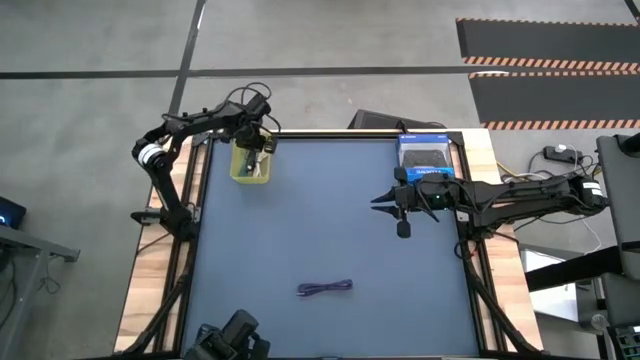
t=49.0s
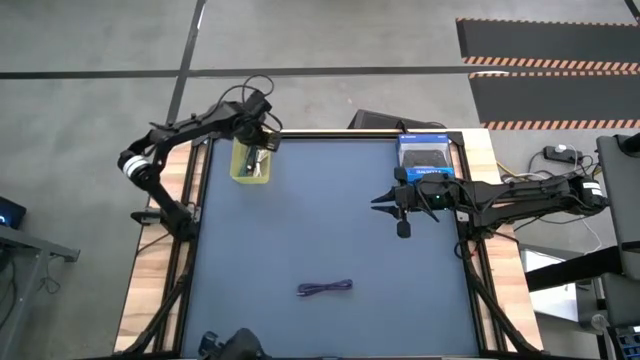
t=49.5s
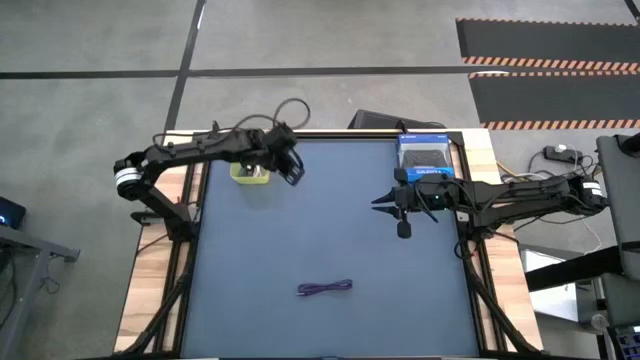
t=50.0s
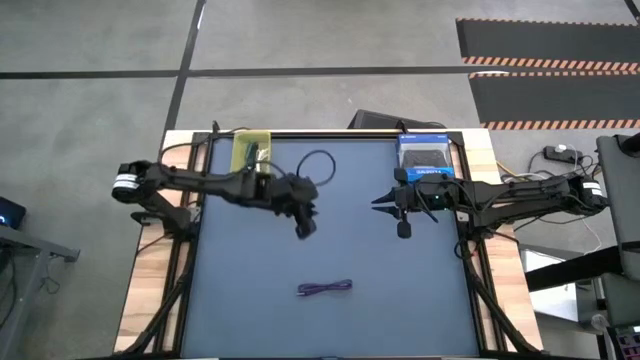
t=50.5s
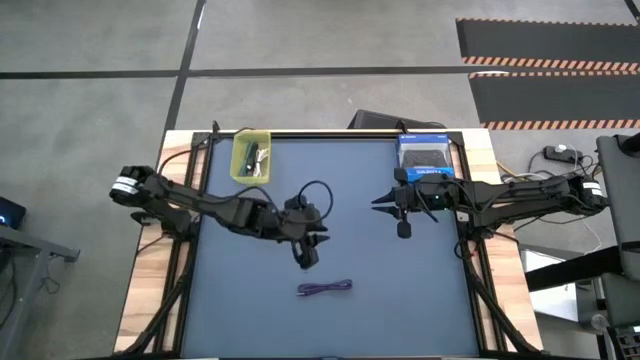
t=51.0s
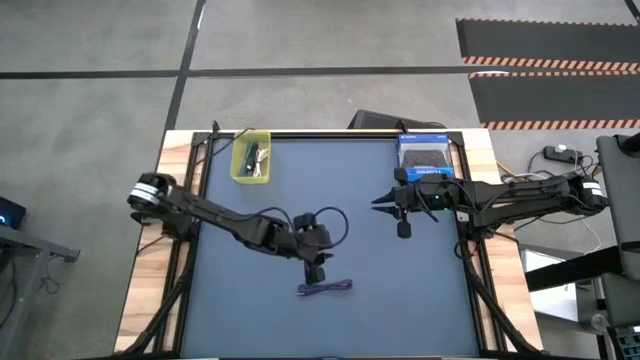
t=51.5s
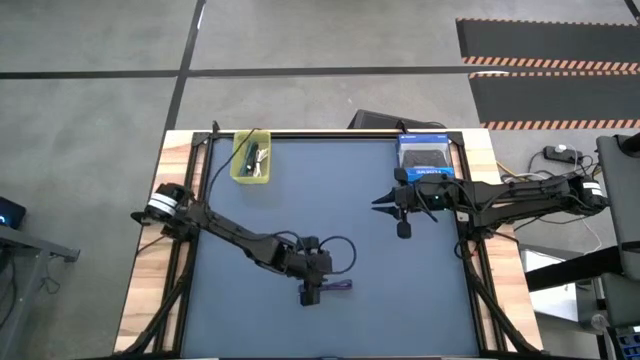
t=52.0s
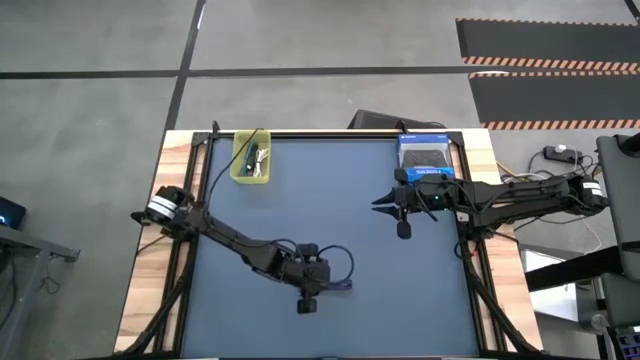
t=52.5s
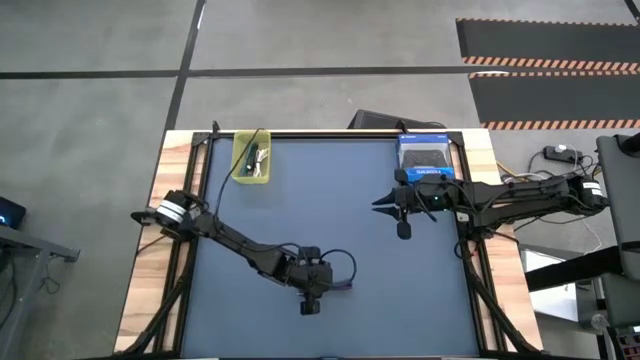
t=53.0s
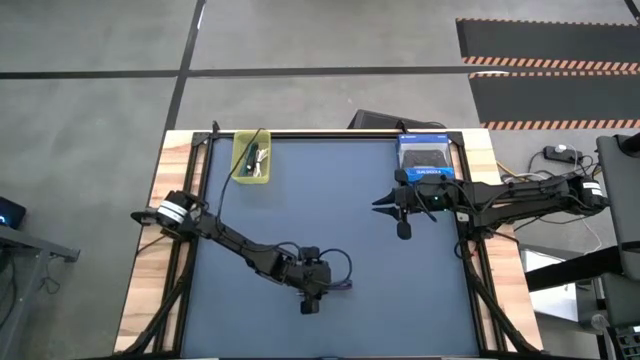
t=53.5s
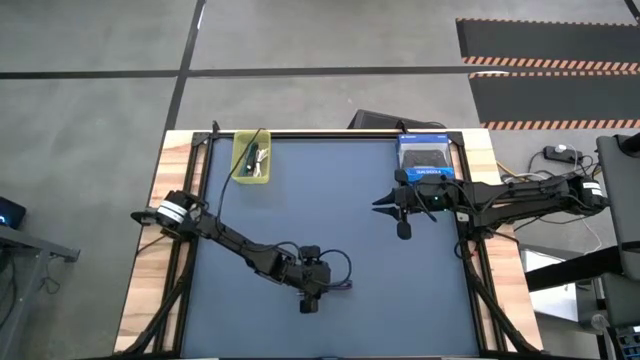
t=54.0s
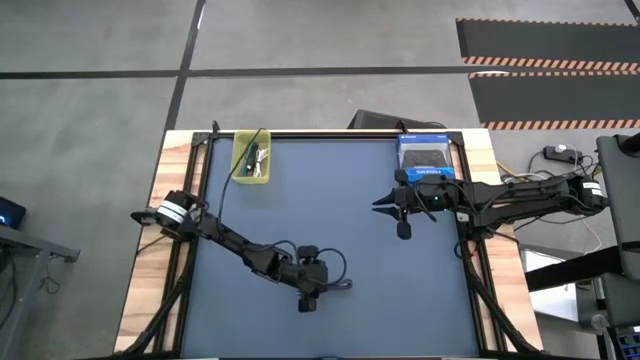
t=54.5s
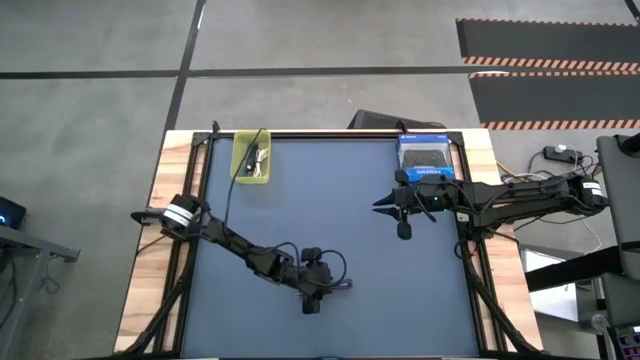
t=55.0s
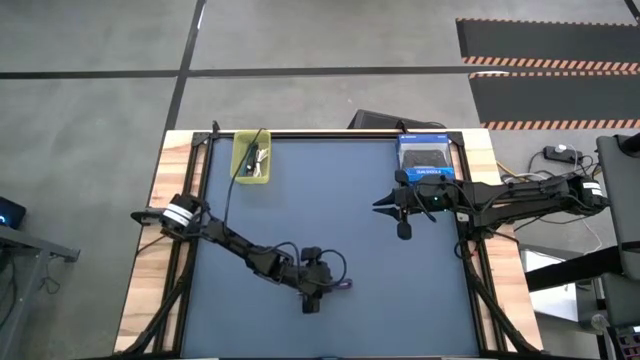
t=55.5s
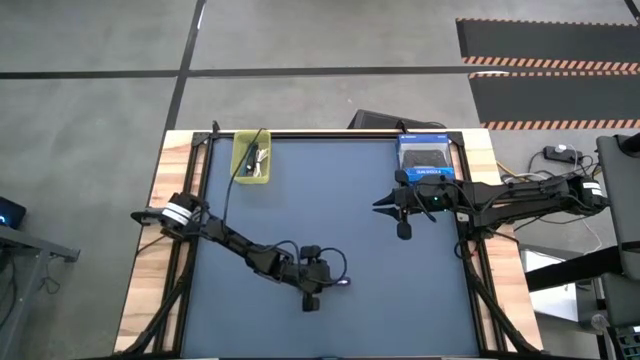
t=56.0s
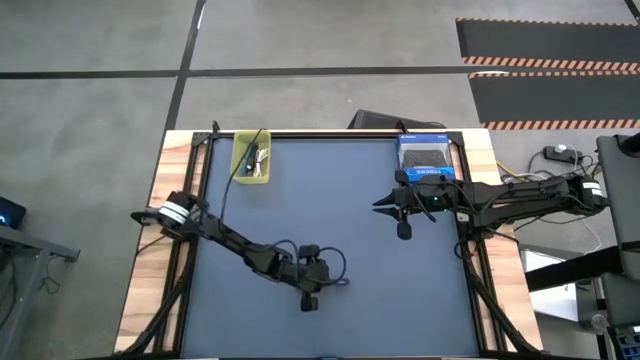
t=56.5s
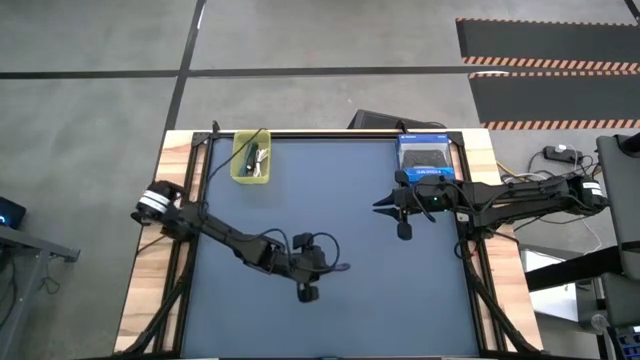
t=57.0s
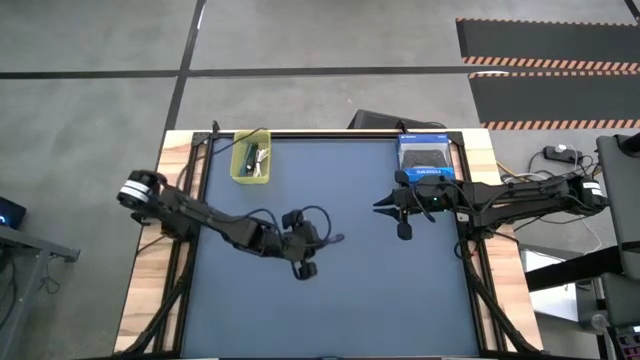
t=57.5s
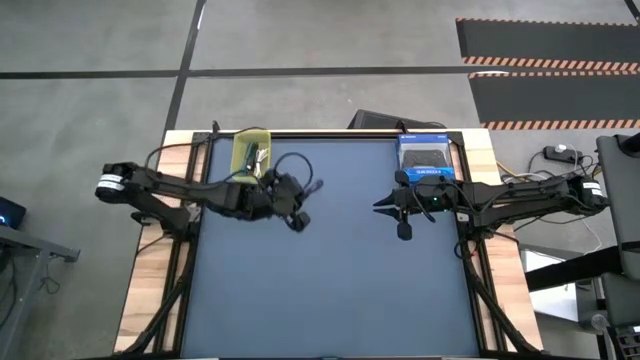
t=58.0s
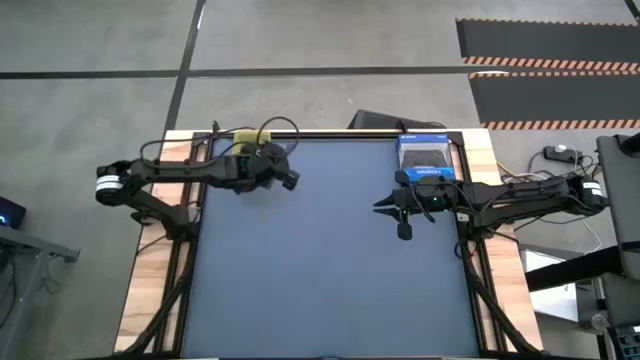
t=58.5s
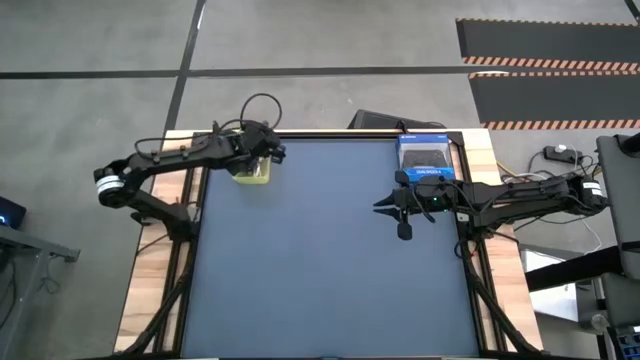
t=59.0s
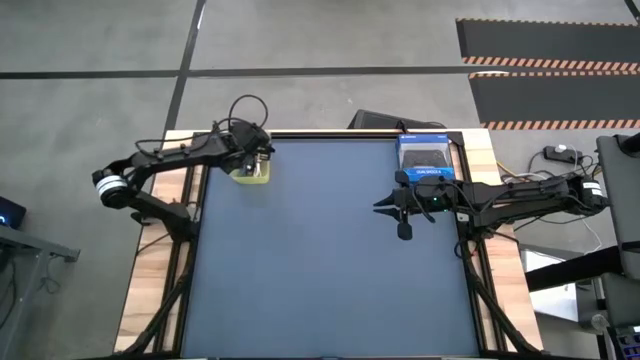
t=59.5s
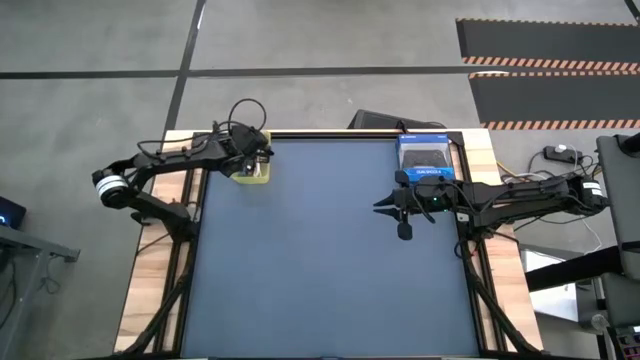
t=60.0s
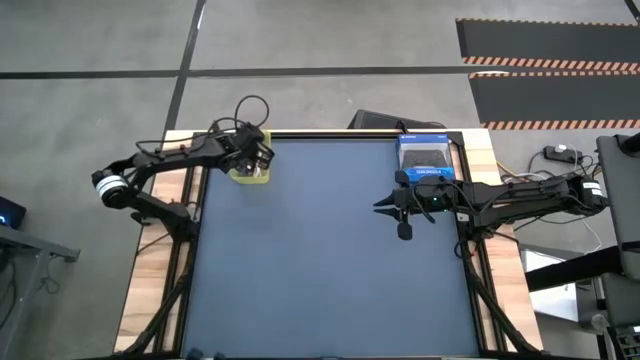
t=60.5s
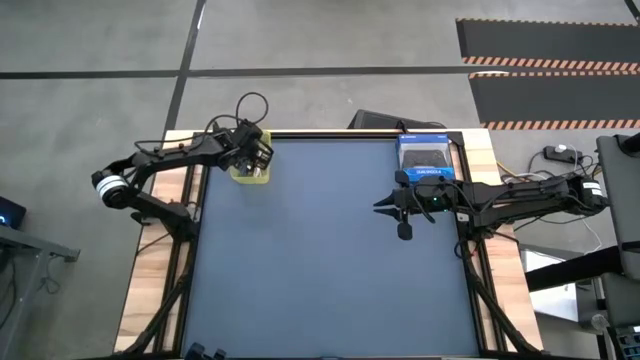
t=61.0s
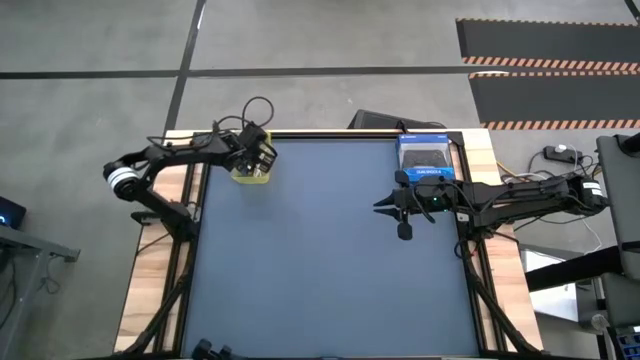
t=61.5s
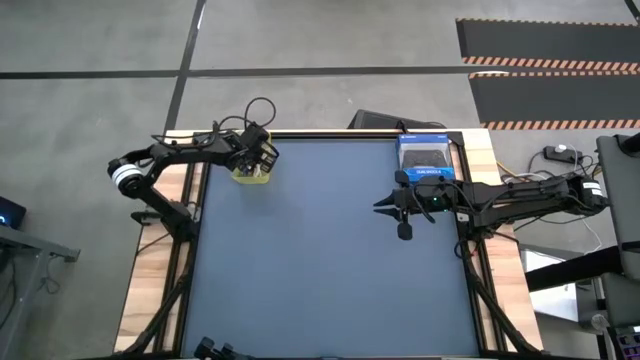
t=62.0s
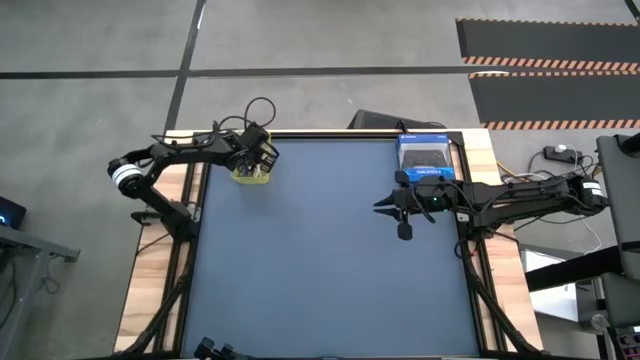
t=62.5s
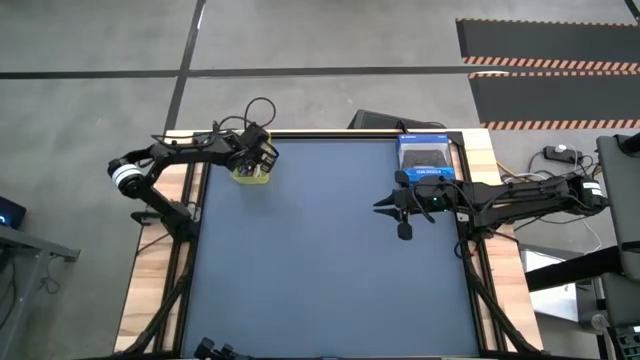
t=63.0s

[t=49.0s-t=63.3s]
Task: Pick and place USB-C Cables
Put the purple black charger cable into the yellow bin

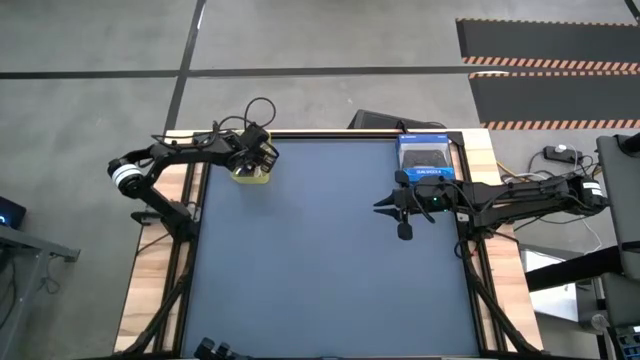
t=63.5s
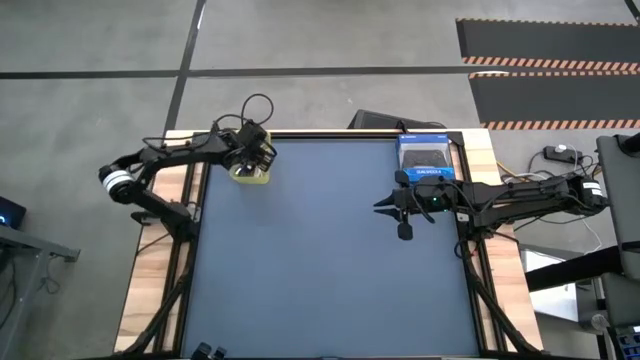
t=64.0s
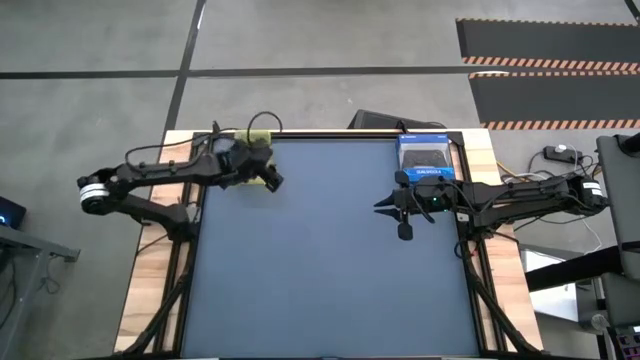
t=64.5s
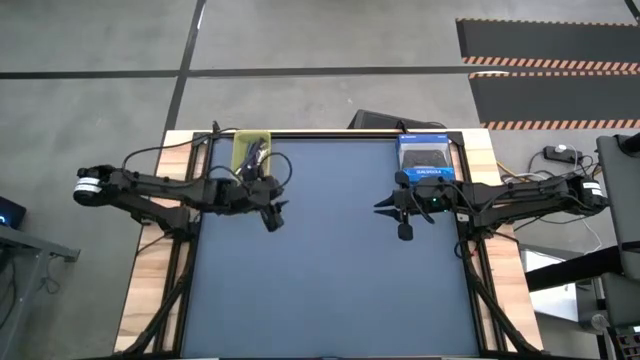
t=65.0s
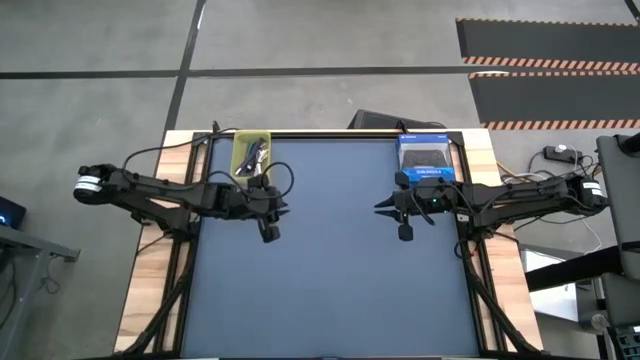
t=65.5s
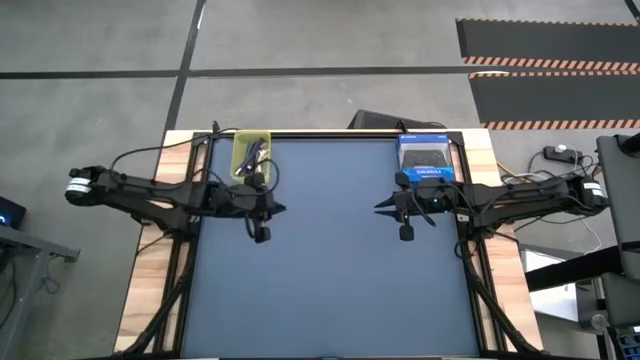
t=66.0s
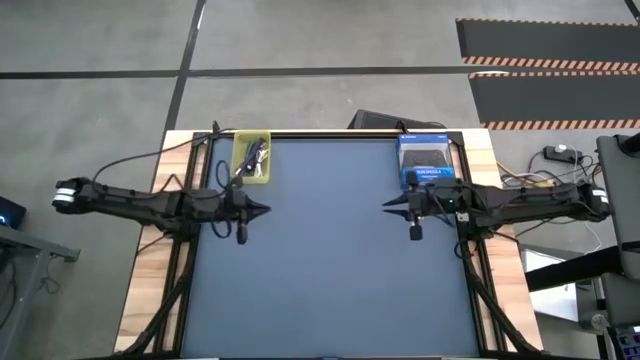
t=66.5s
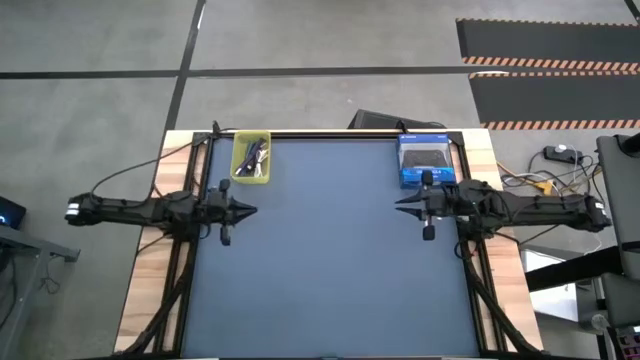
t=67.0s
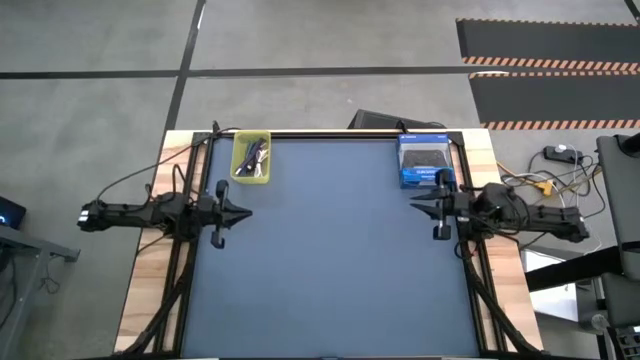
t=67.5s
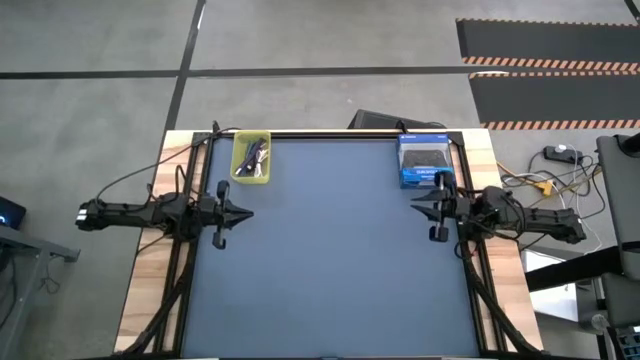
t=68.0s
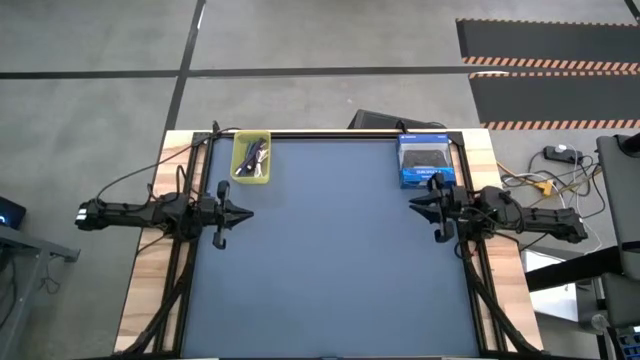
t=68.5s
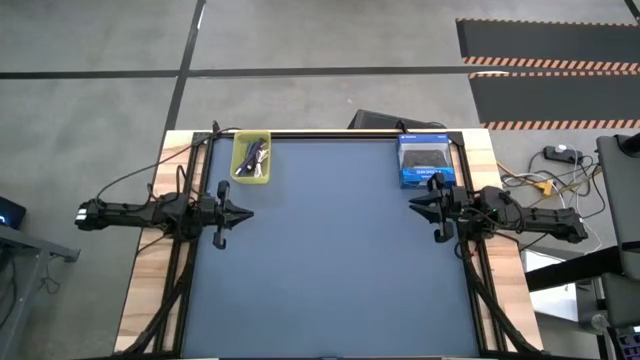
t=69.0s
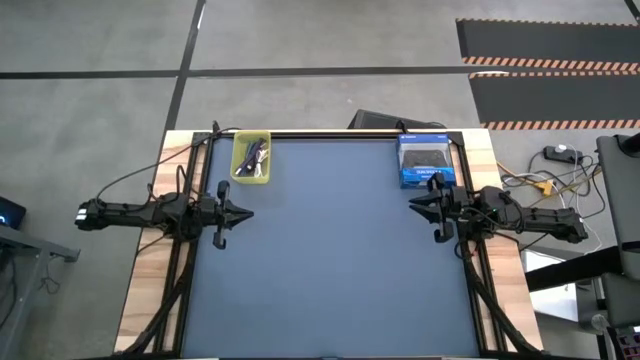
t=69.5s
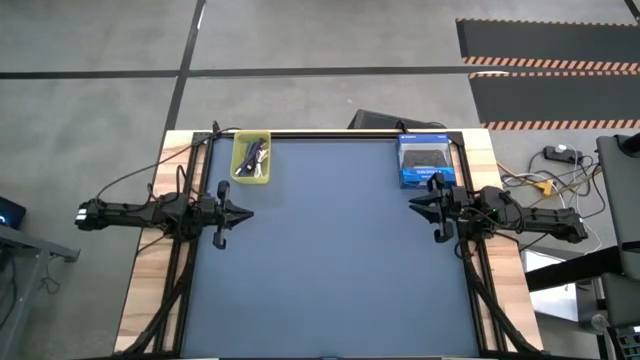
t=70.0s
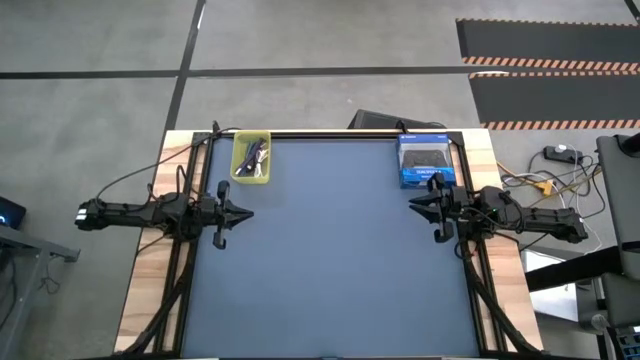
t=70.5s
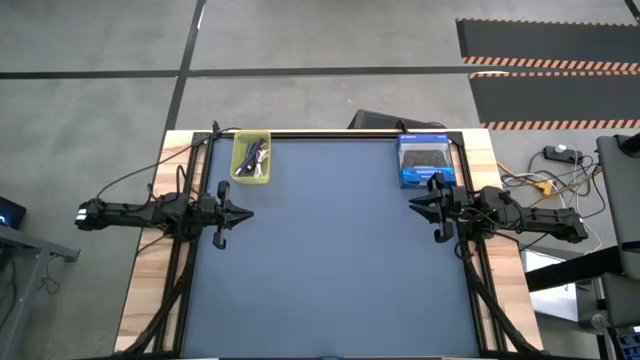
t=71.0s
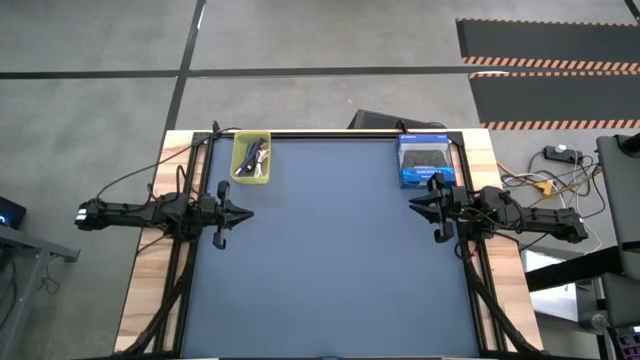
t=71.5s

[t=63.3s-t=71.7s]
Return to Home Position
